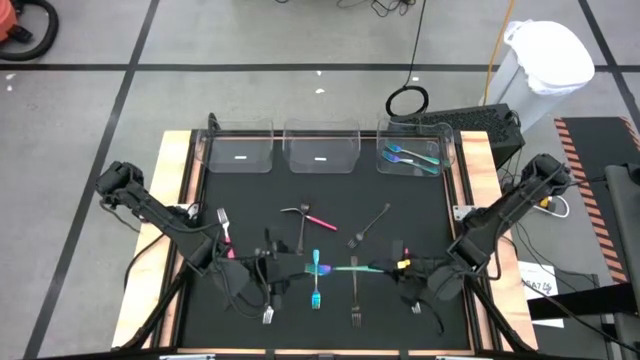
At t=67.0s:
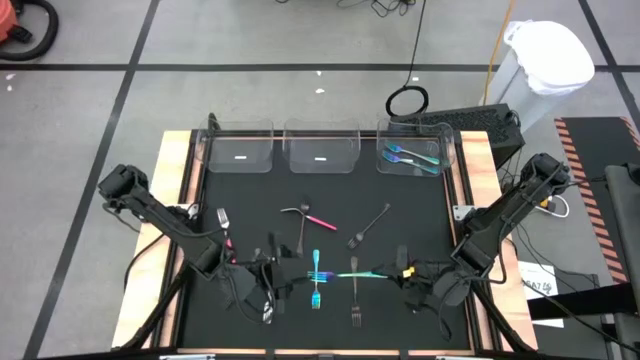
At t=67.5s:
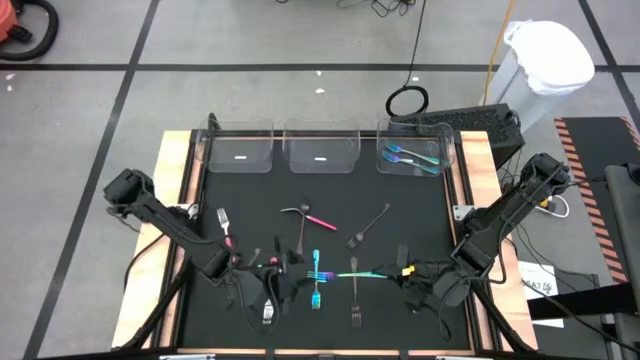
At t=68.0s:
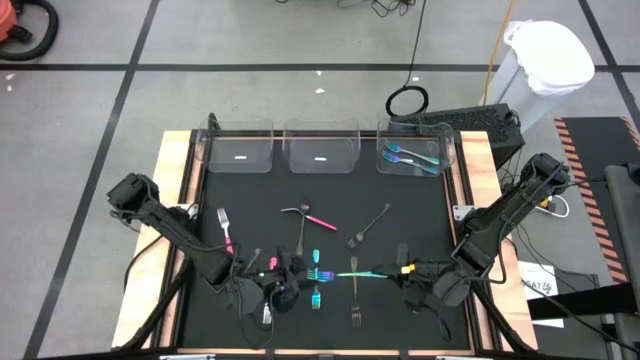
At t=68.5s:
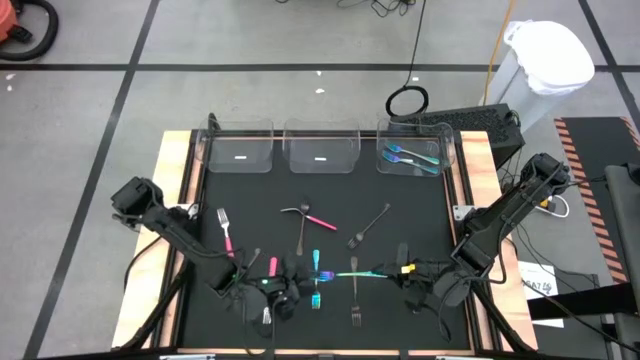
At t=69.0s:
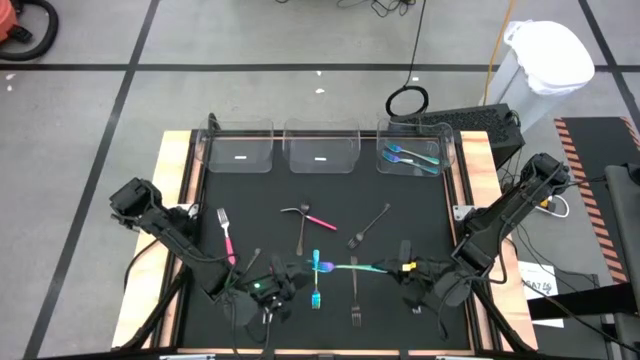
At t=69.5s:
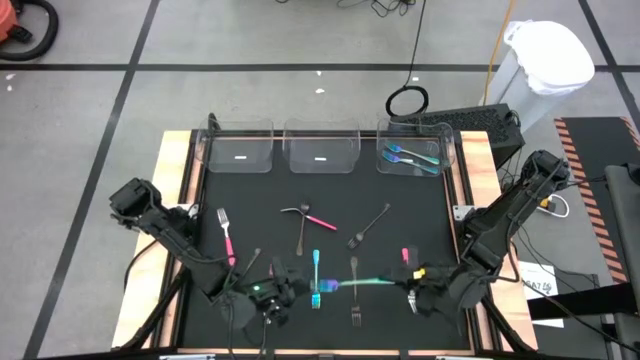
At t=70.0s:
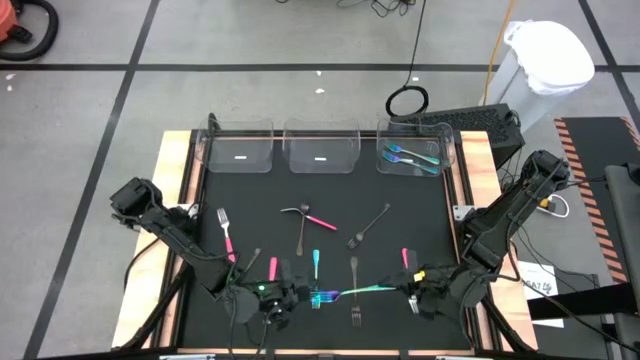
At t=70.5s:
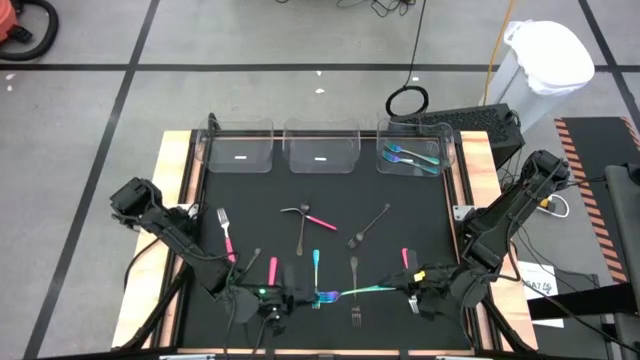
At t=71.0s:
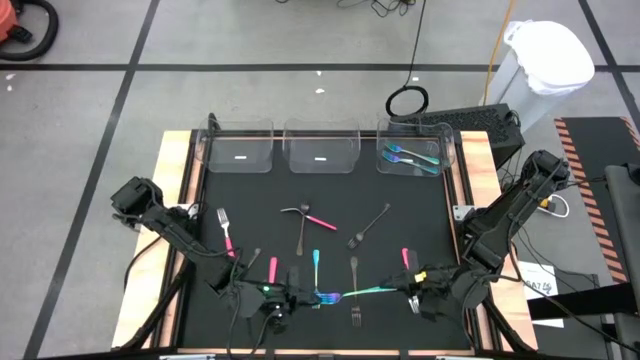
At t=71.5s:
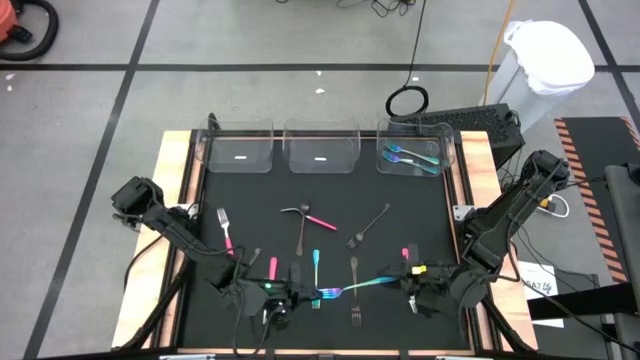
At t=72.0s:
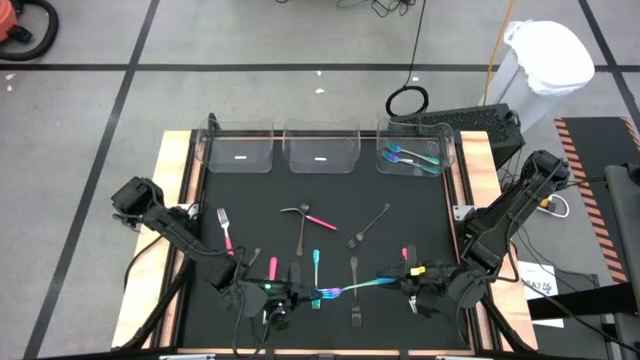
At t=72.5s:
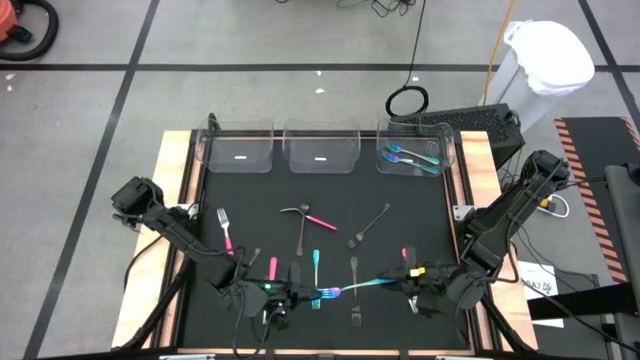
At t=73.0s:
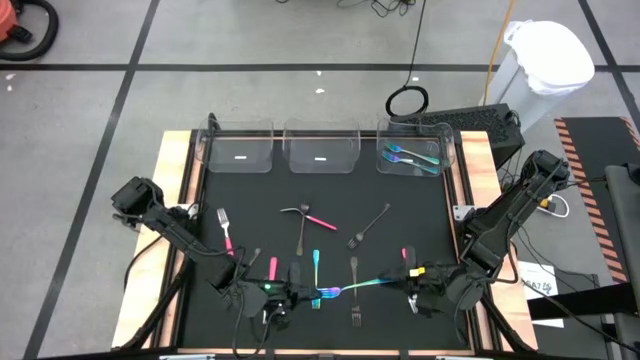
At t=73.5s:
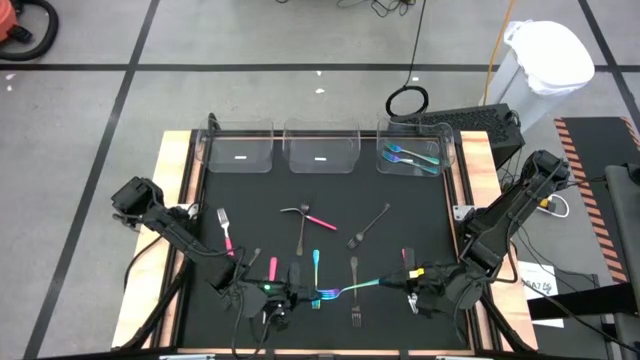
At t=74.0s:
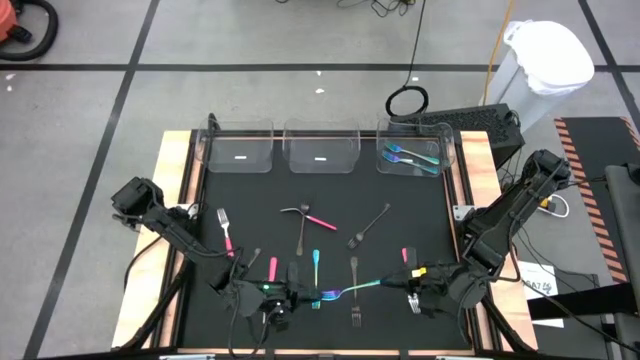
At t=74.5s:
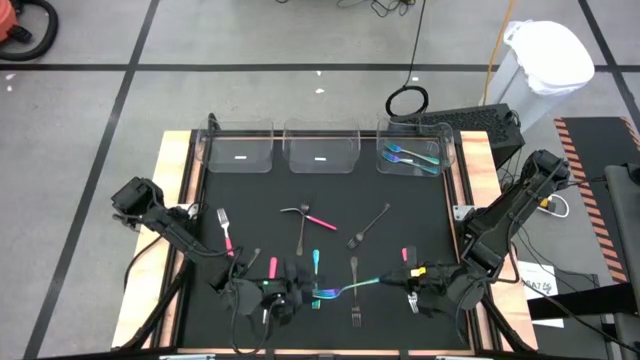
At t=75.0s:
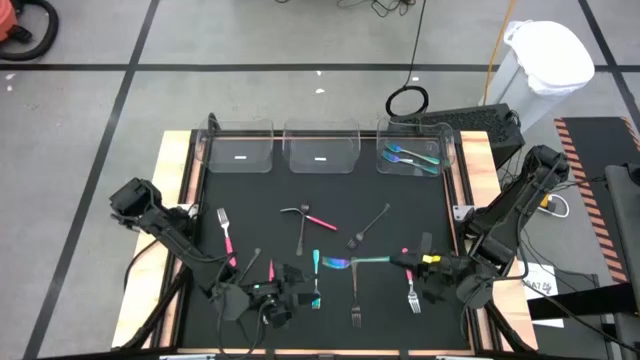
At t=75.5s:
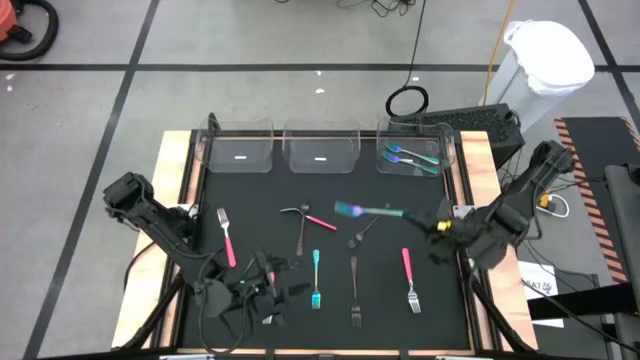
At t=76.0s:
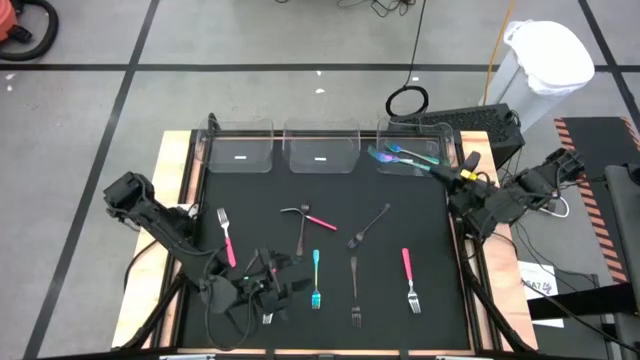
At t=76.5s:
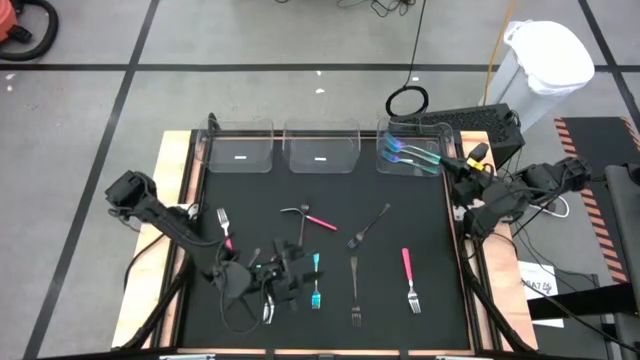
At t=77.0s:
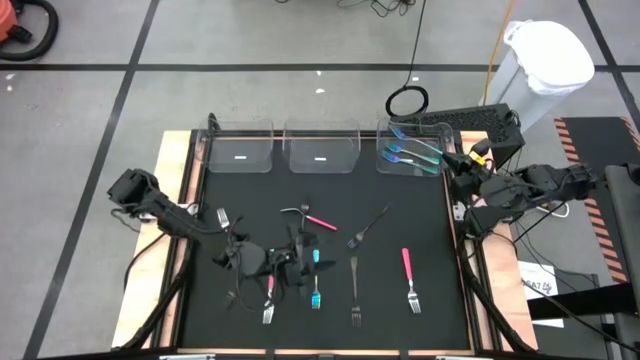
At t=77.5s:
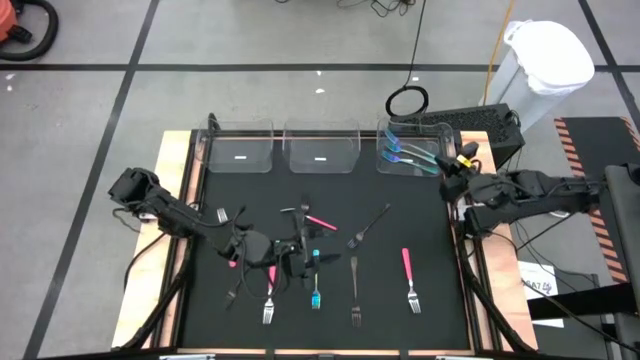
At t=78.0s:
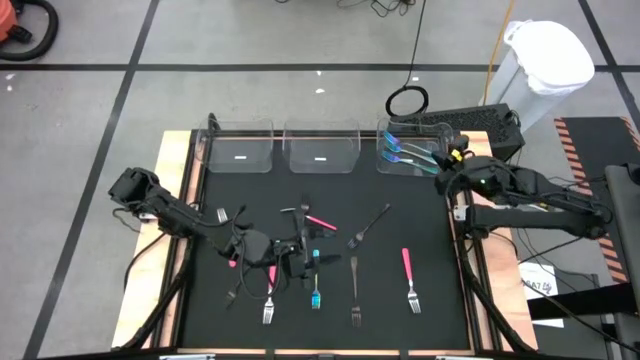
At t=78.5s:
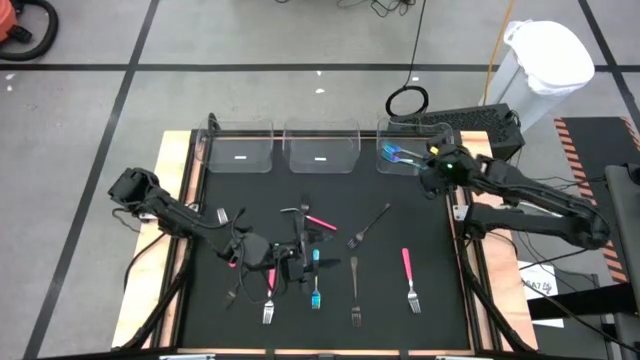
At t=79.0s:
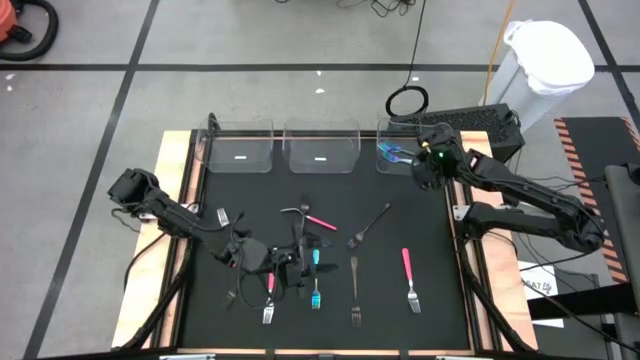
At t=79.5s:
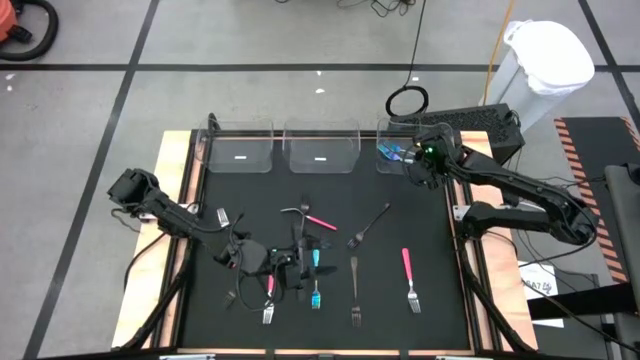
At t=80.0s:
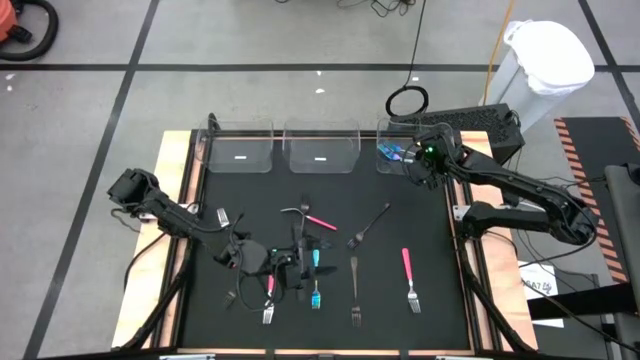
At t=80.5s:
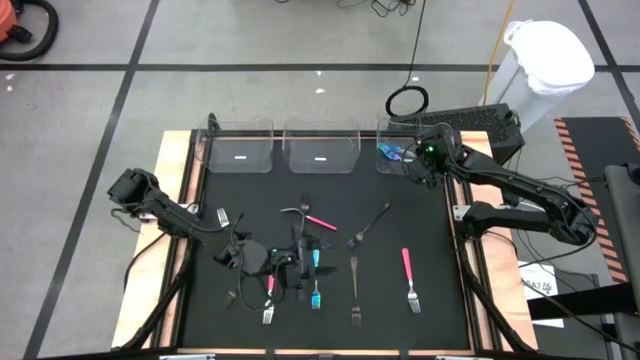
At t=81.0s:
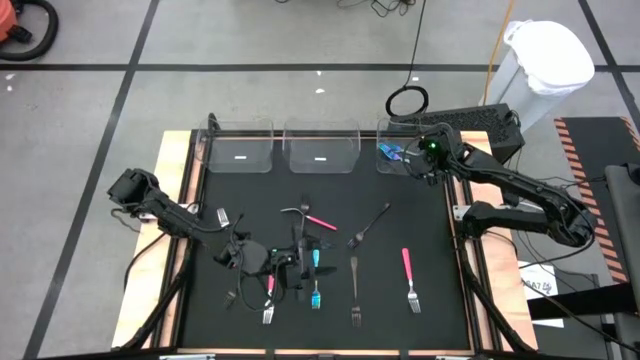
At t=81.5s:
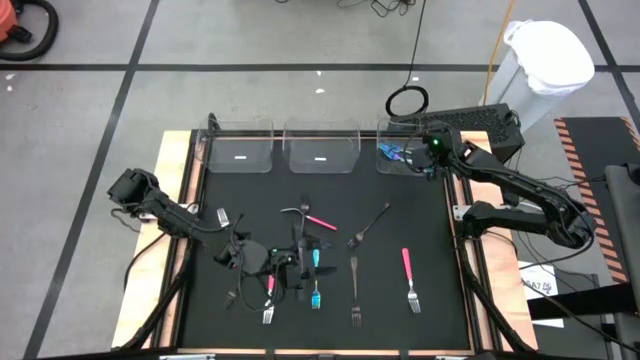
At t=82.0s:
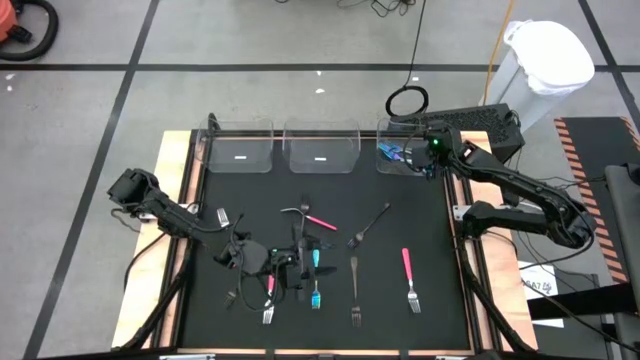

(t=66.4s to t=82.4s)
Task: Sort silverware by color (type)
Put the blue fork into the right transparent bin

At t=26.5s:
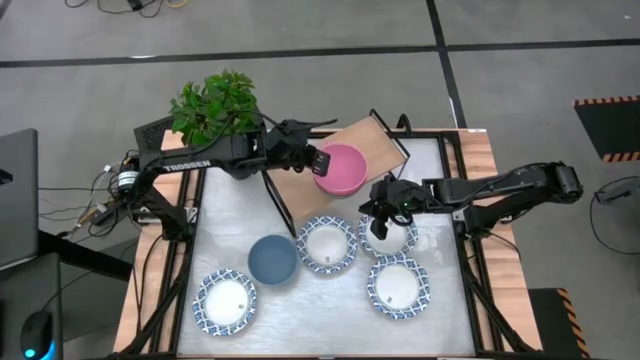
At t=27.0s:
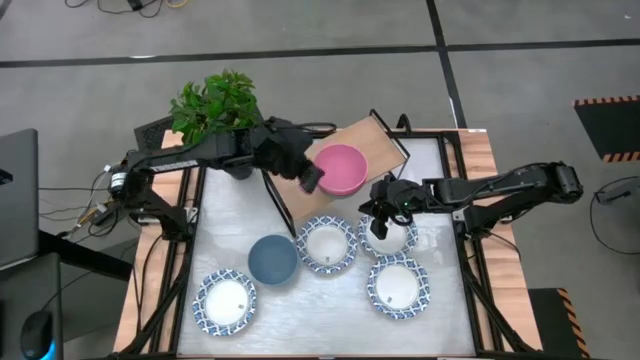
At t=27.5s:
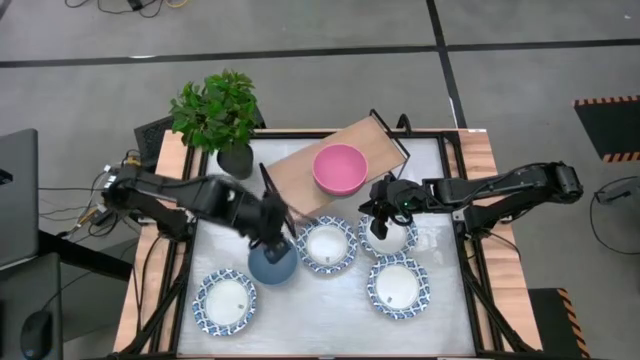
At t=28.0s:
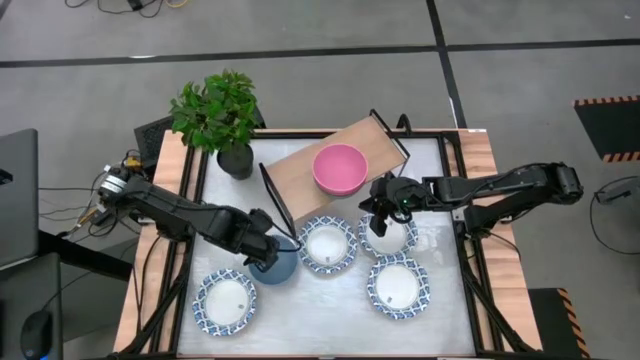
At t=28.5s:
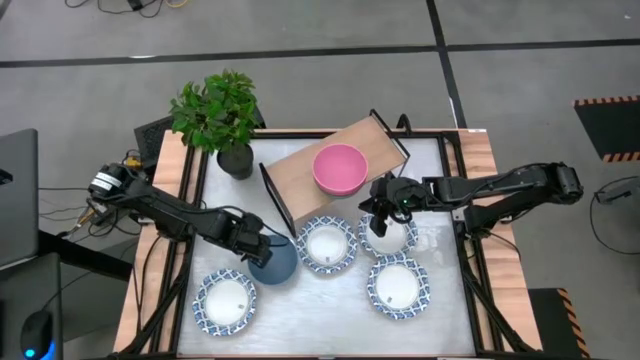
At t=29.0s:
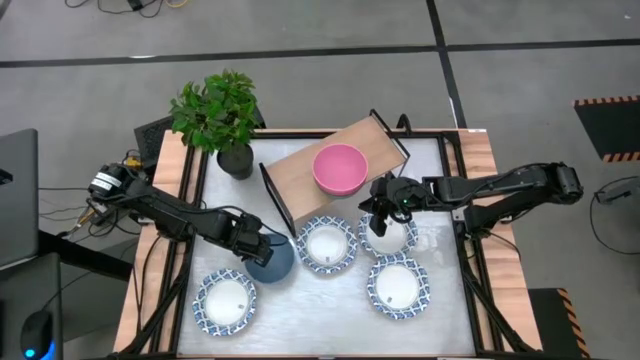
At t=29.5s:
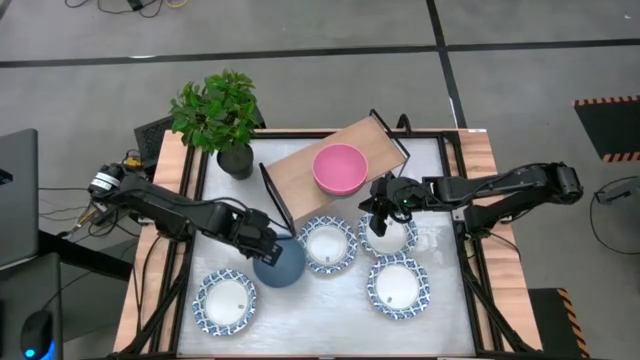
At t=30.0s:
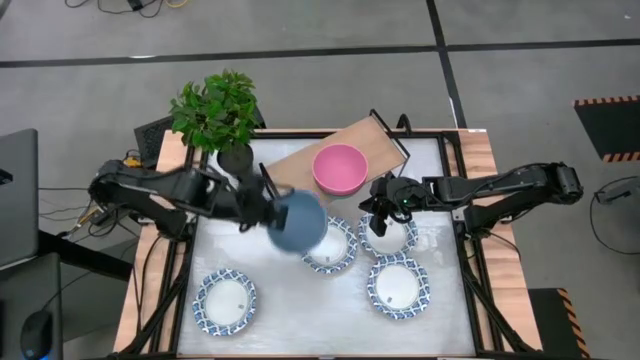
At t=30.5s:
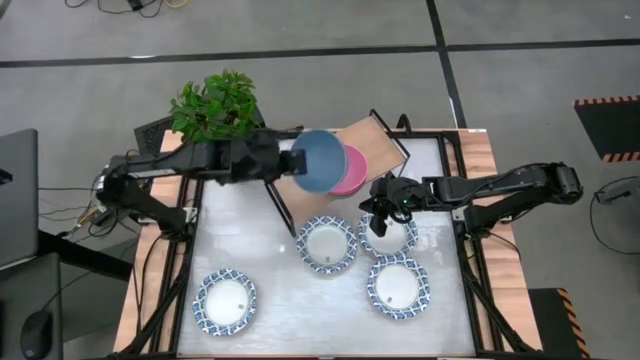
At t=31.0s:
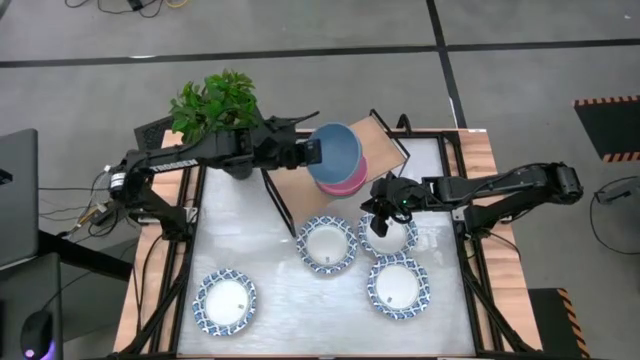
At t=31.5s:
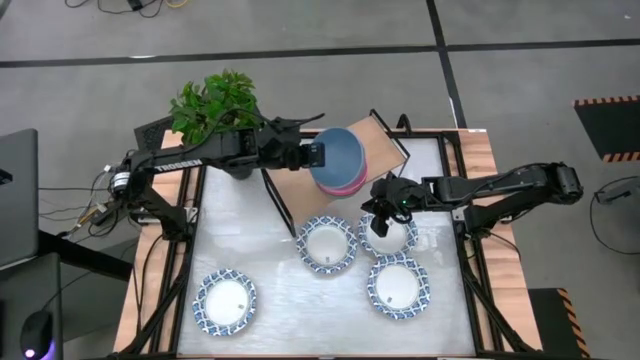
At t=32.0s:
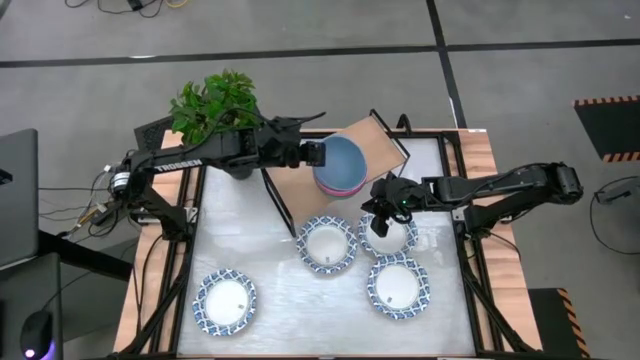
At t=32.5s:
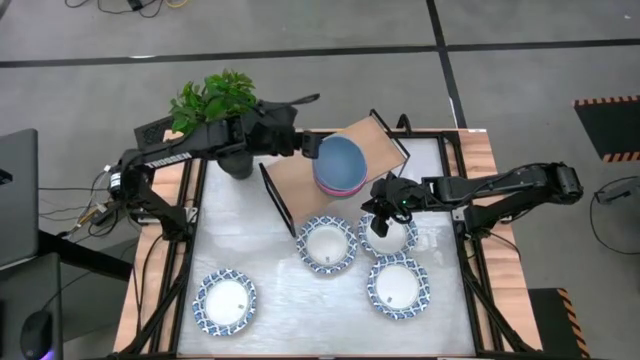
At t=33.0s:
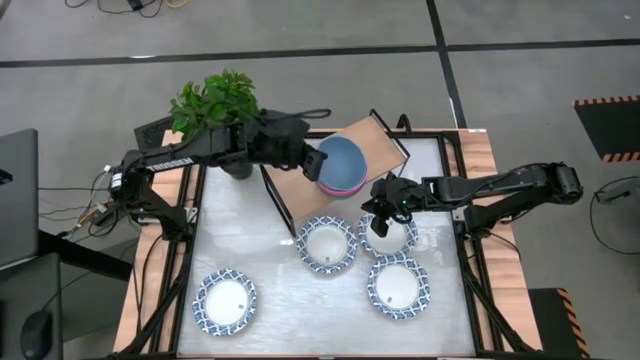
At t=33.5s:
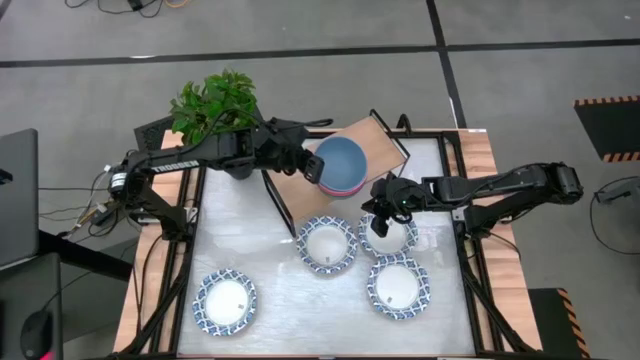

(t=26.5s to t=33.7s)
Task: Place and stack bowls onto a shelf
Stack the blue bowl on the pink bowl on the shelf
